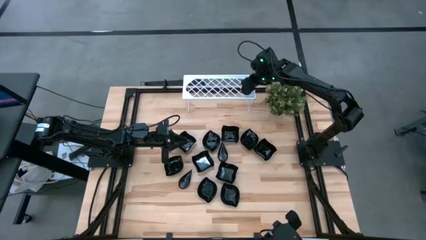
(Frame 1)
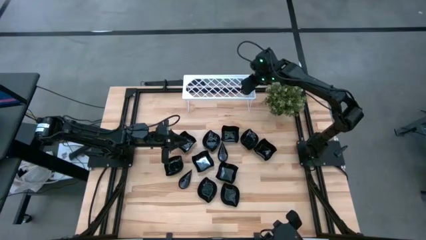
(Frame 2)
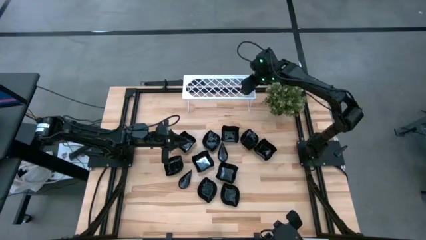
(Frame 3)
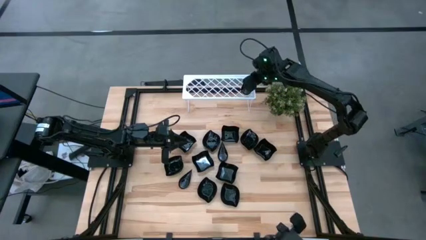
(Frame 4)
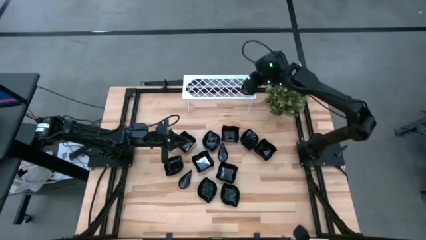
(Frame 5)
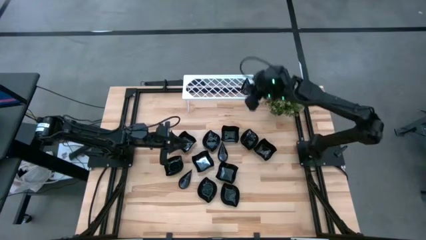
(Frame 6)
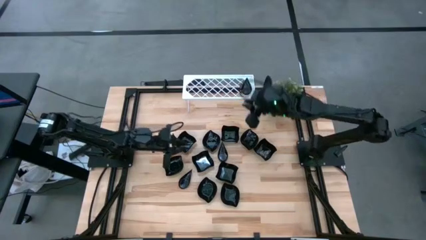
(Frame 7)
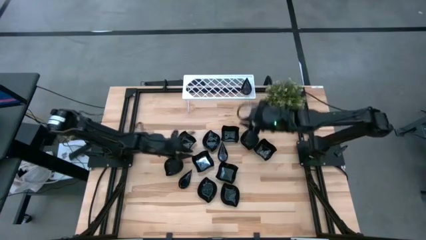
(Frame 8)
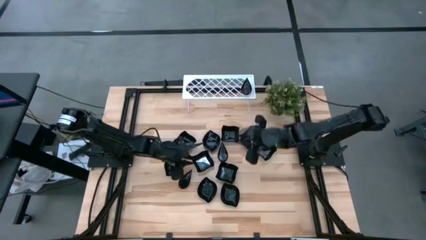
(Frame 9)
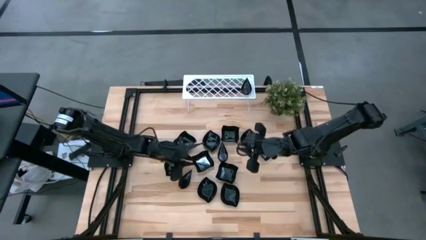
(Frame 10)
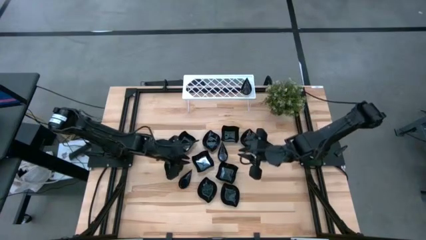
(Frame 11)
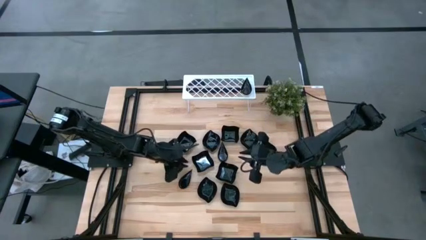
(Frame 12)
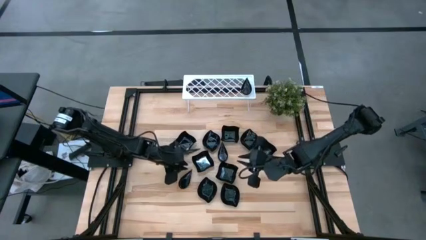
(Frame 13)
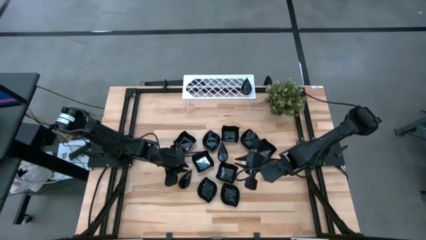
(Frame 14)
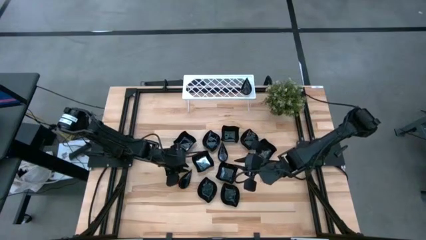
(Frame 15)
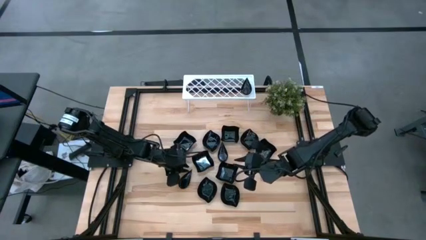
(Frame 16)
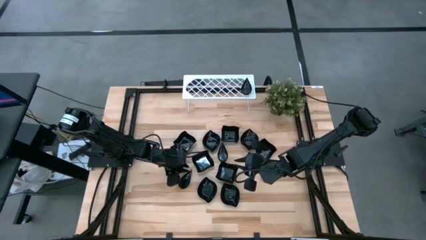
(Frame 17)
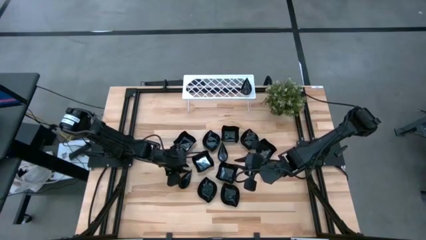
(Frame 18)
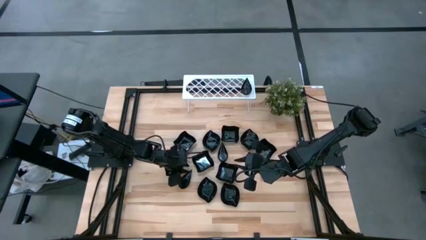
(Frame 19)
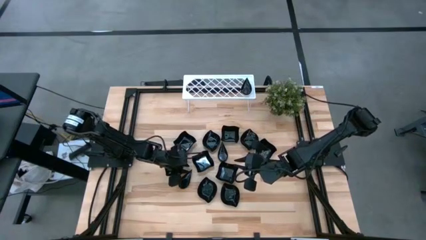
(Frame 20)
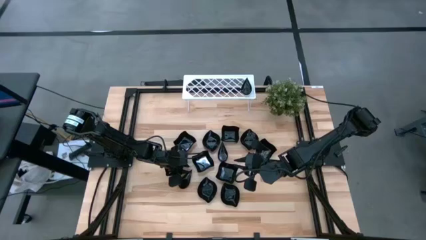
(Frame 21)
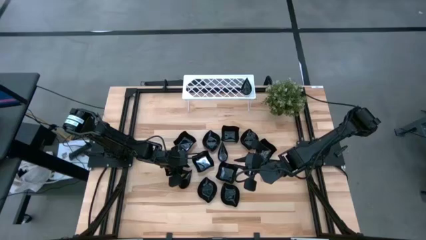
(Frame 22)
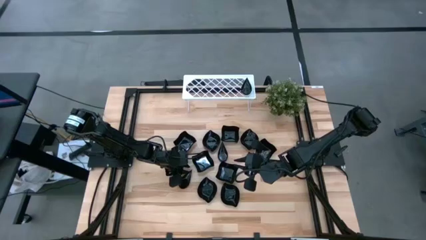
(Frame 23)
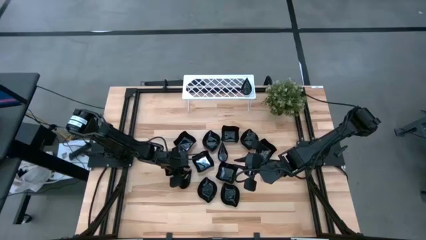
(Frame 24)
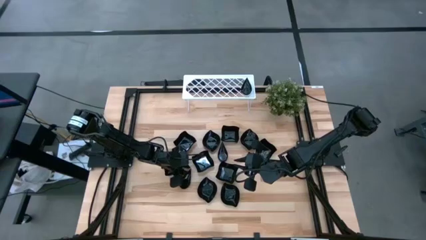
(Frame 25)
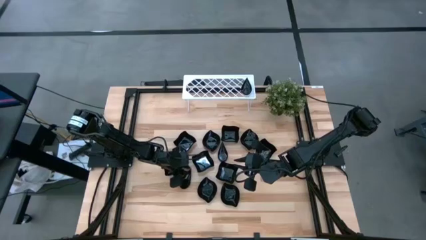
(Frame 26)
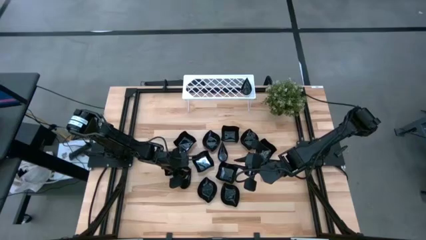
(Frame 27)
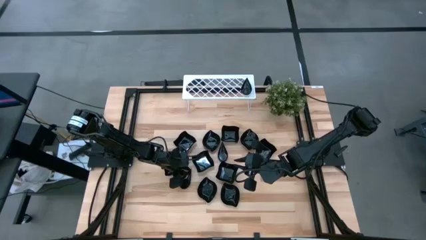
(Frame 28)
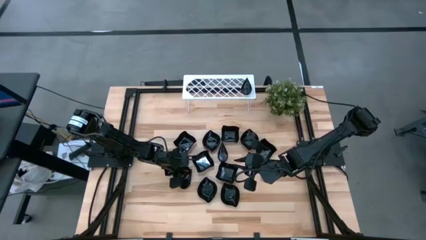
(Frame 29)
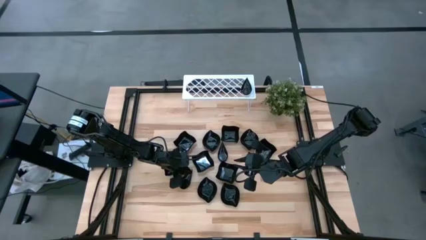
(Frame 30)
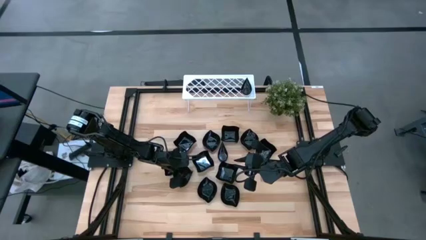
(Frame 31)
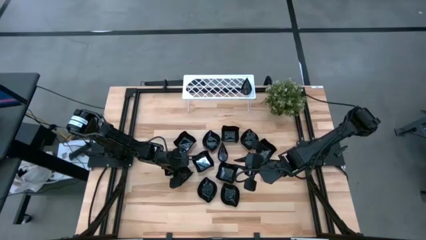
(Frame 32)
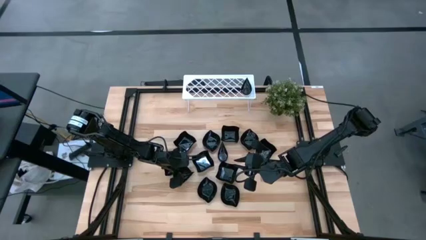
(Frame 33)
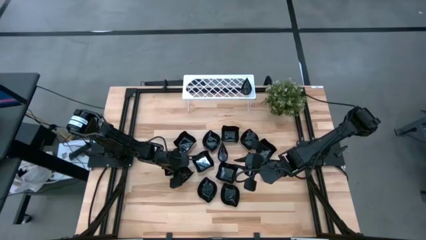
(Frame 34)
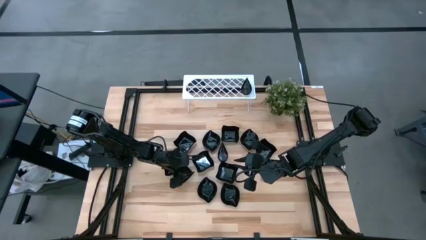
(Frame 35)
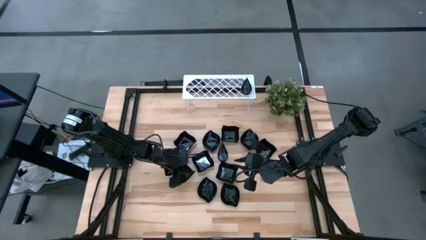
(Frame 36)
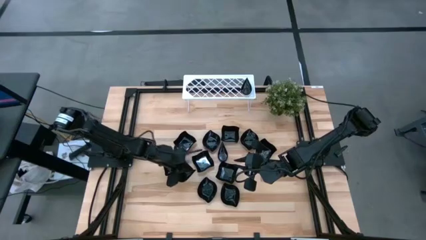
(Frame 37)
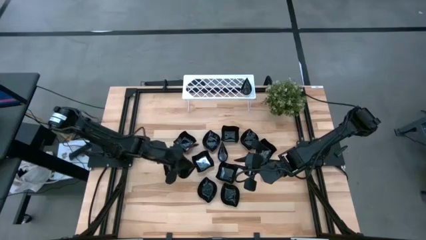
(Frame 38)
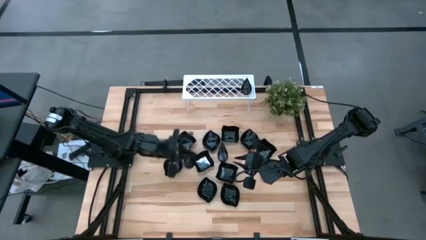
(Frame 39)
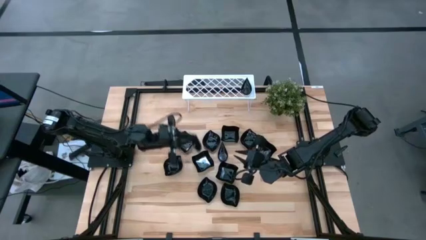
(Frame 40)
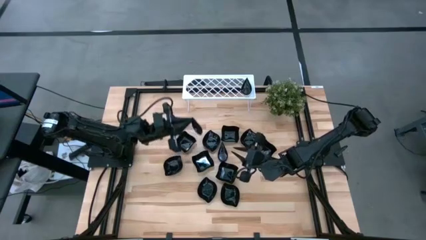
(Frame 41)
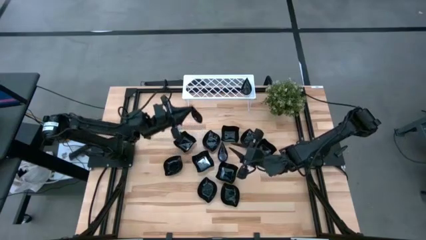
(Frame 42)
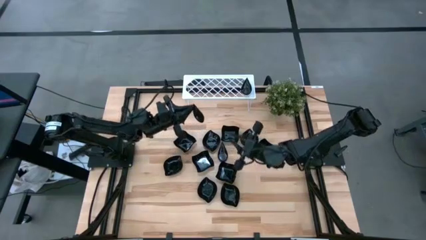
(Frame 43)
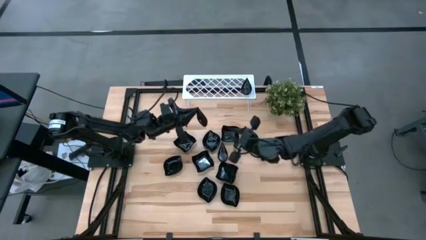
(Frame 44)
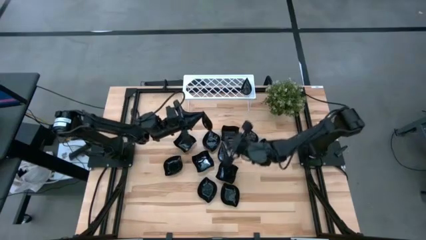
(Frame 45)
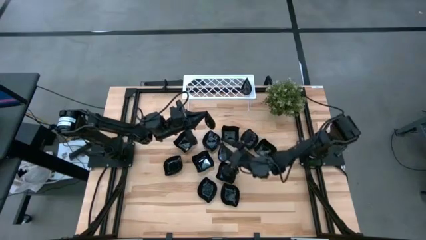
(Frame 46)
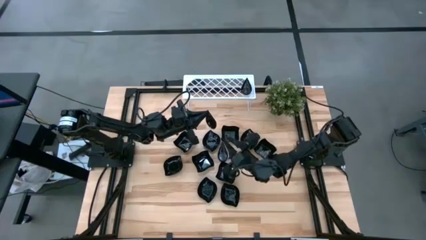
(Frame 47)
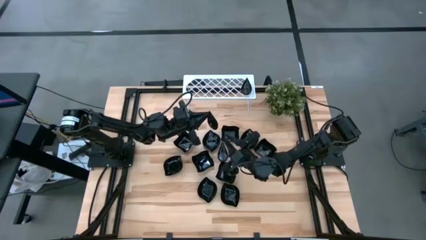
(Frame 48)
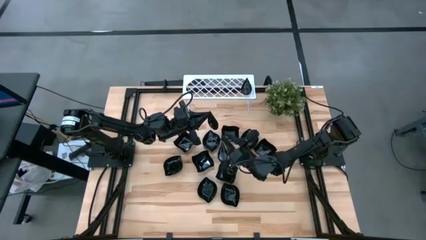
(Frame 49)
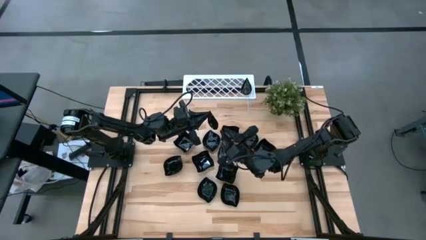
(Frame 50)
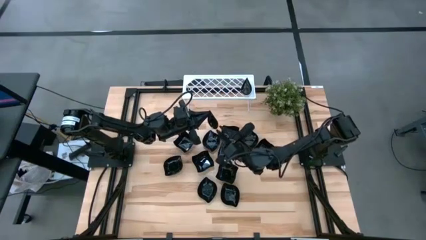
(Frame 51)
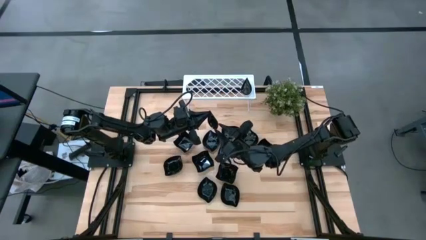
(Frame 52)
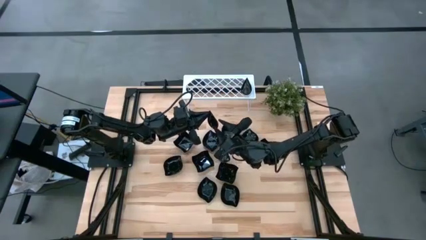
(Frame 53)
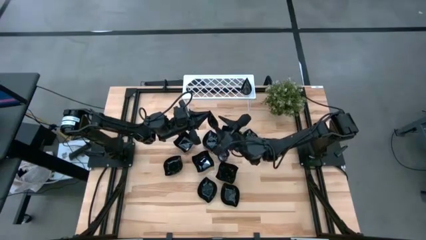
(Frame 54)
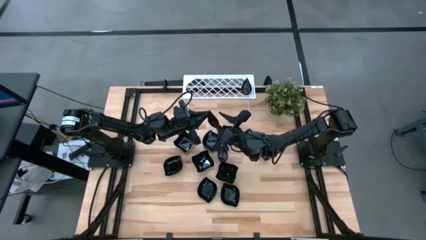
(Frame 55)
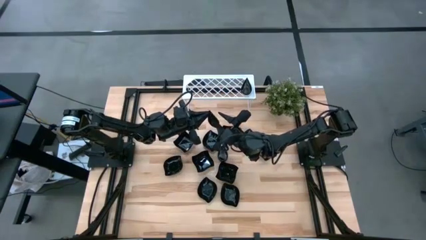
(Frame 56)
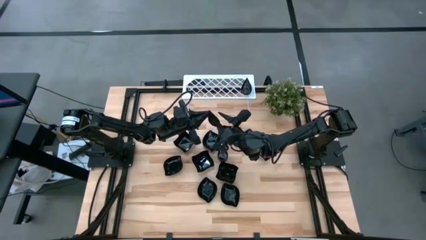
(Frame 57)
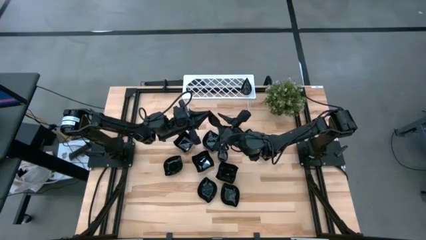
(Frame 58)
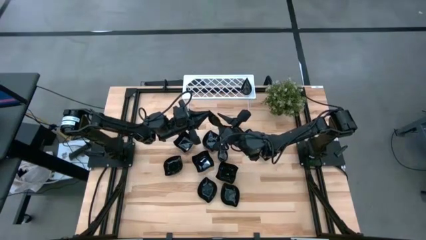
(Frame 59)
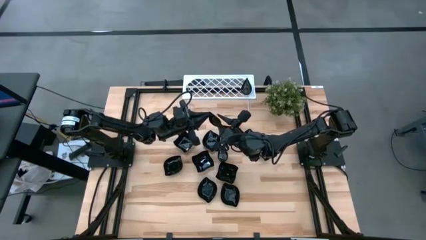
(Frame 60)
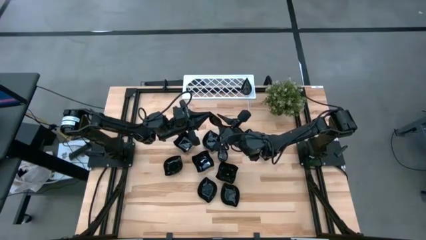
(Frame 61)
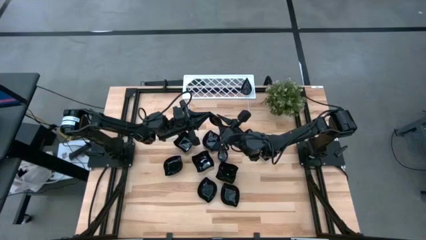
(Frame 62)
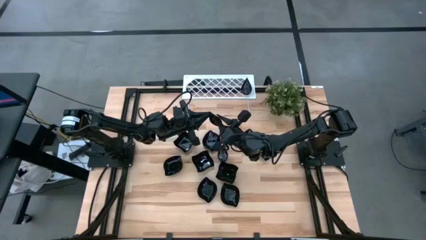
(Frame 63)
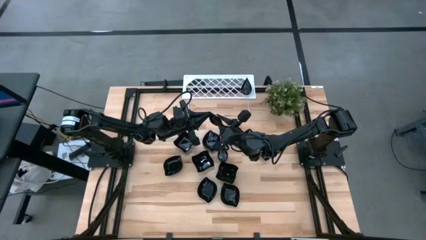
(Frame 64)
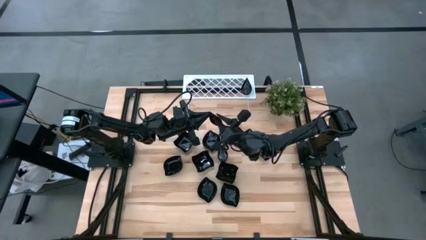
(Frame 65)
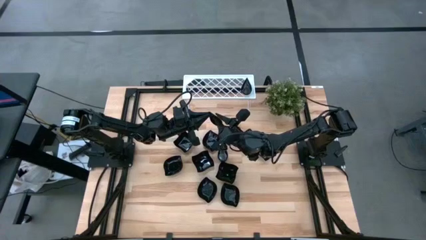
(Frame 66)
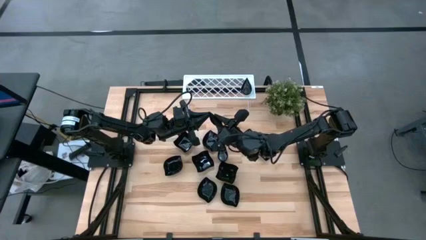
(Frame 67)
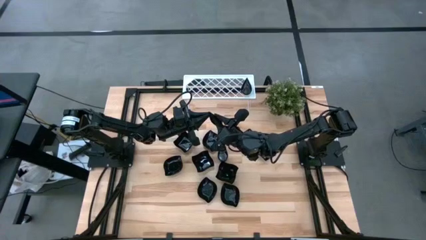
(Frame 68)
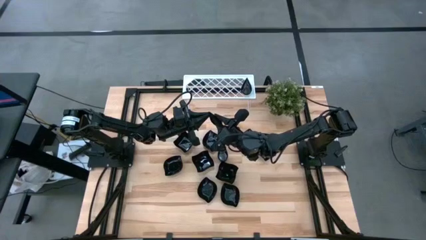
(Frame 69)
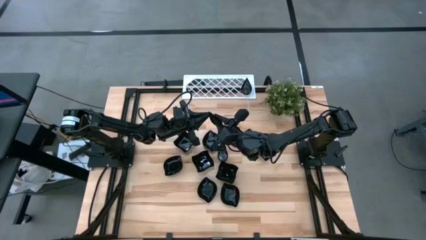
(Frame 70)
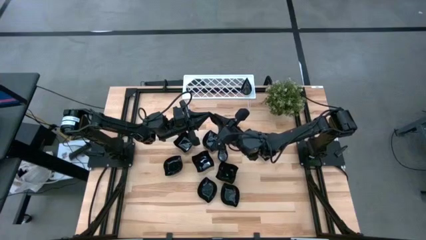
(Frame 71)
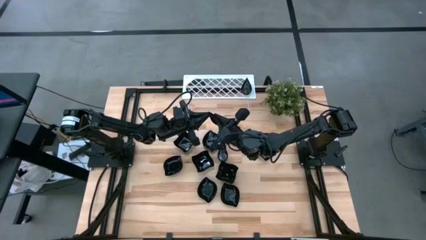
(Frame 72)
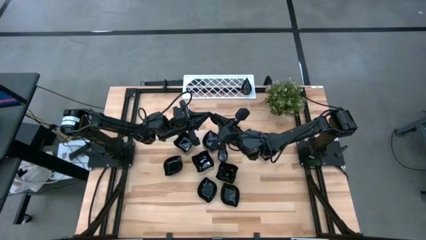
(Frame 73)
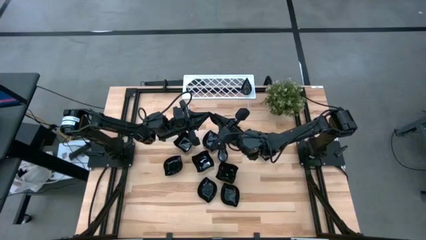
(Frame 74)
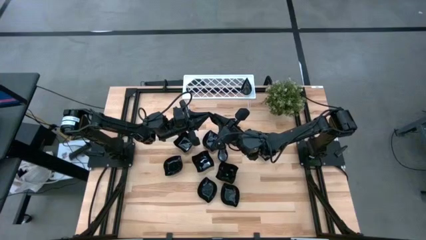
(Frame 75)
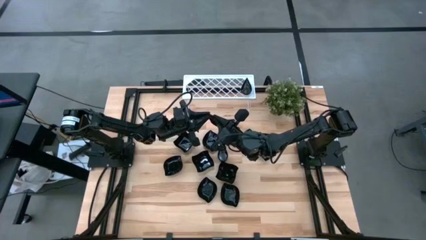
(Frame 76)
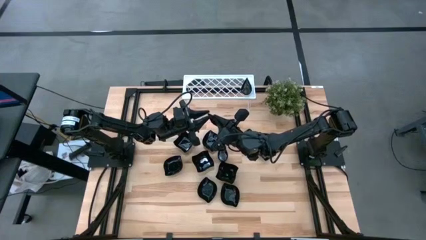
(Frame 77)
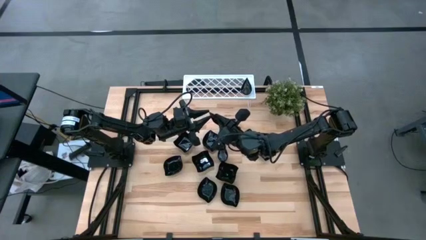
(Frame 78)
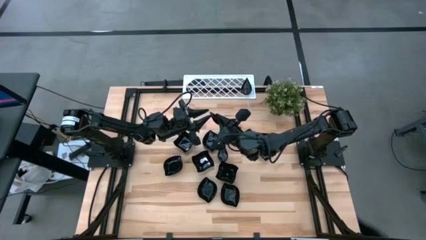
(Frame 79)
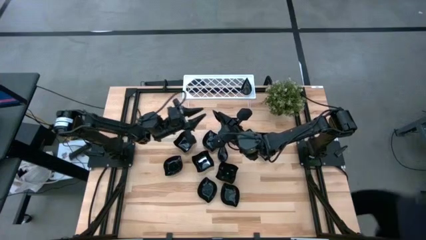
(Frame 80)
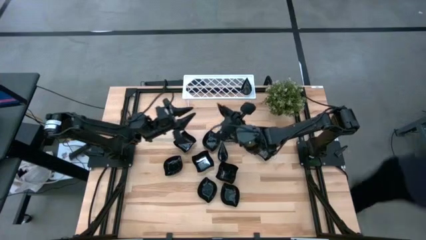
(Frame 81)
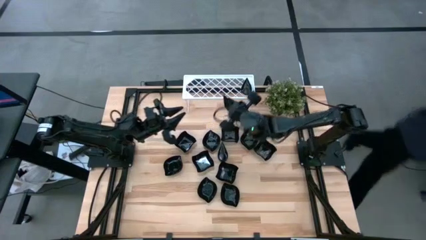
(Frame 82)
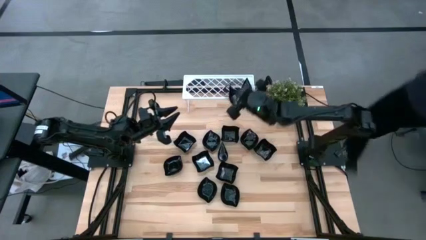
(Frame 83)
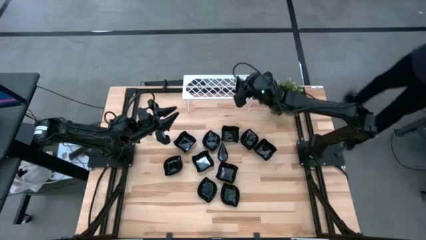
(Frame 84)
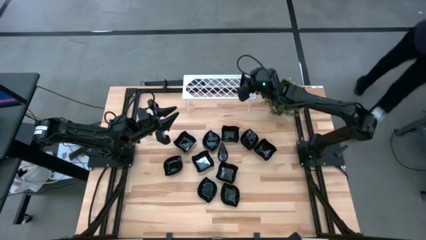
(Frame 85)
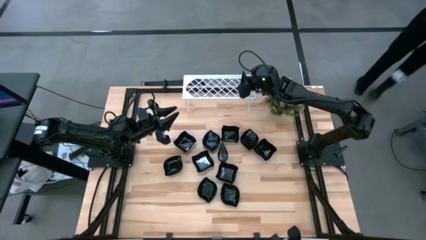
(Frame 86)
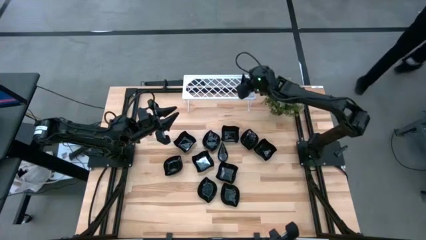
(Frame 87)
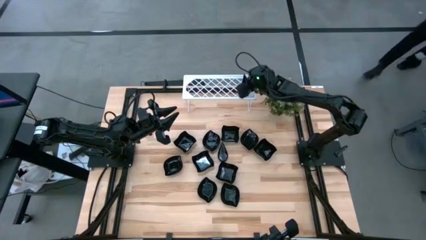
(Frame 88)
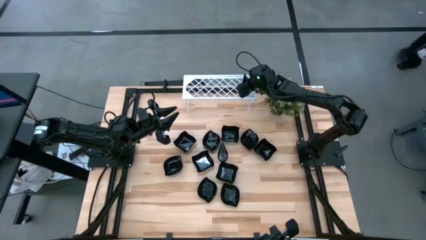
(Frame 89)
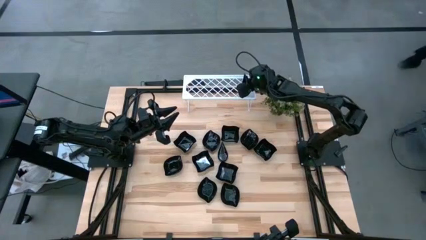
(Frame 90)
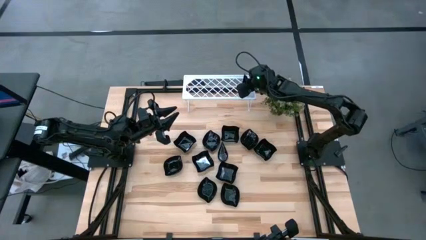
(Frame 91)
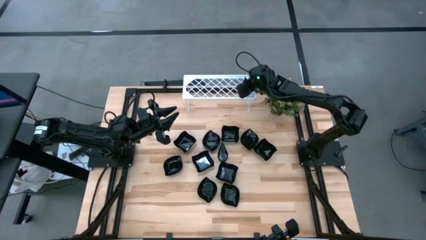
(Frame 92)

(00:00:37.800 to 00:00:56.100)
Task: Pick & Place Mini shaped plates
Stack the drop shaped plate on top of the drop shaped plate on the shelf
